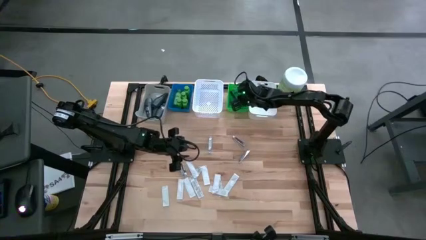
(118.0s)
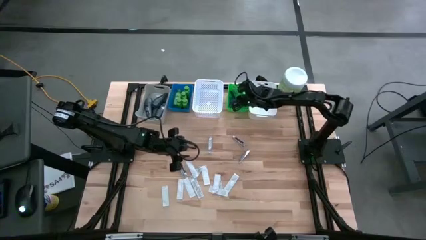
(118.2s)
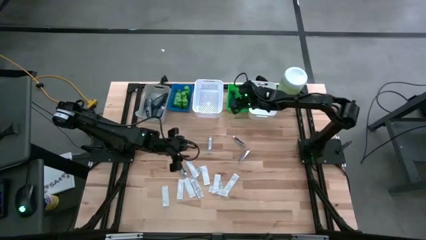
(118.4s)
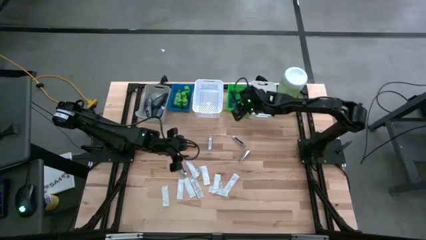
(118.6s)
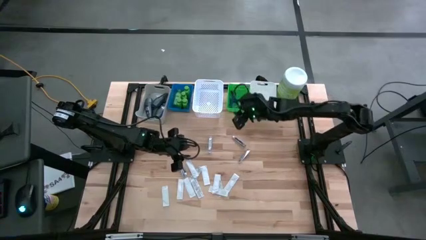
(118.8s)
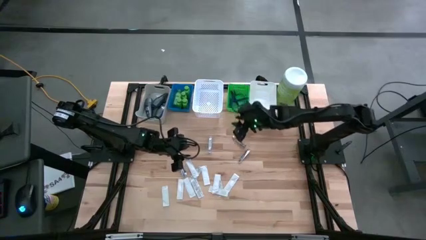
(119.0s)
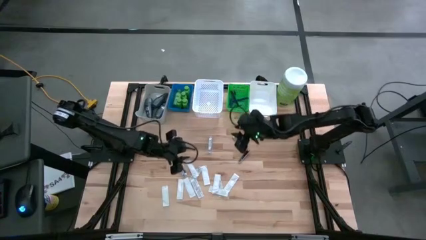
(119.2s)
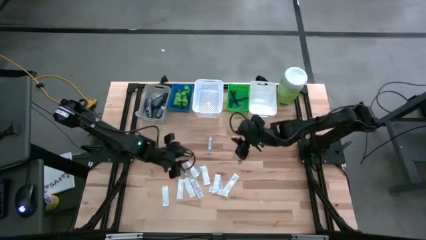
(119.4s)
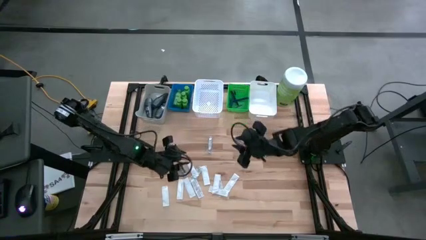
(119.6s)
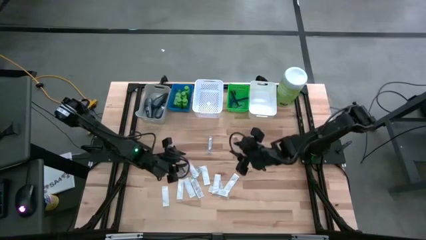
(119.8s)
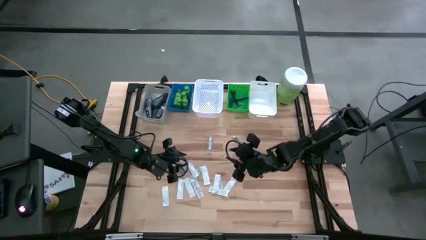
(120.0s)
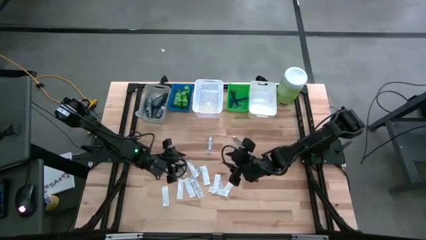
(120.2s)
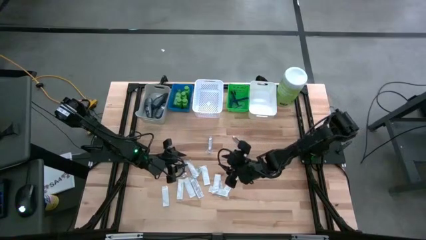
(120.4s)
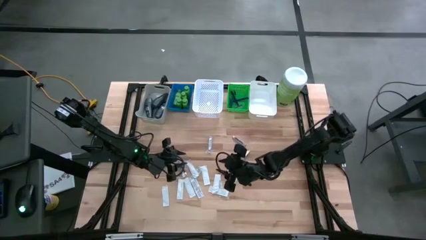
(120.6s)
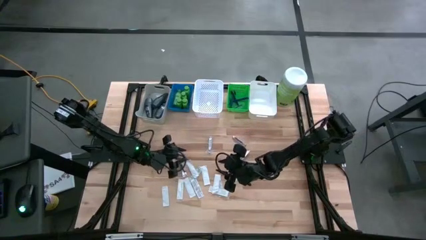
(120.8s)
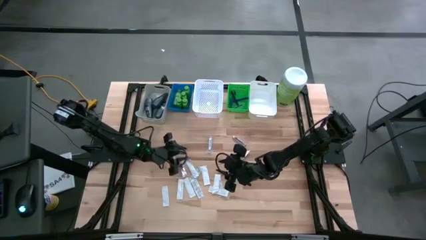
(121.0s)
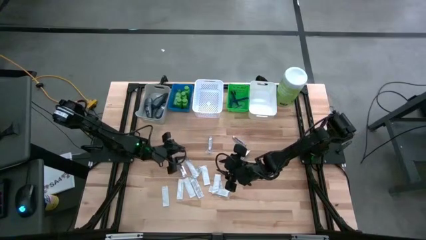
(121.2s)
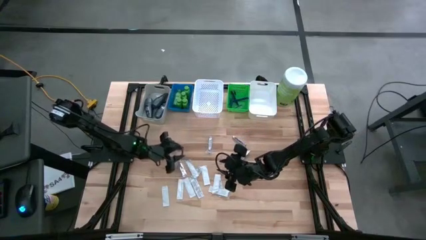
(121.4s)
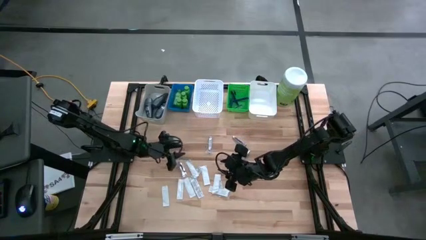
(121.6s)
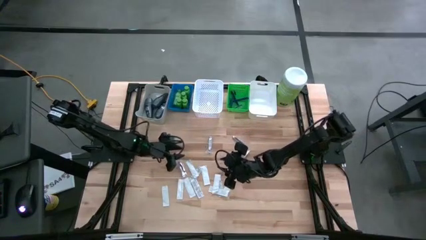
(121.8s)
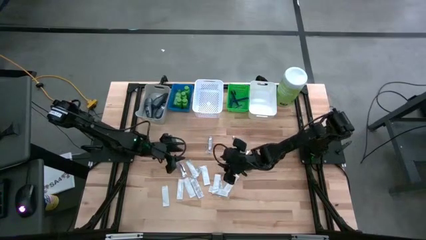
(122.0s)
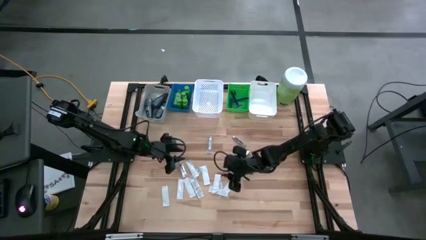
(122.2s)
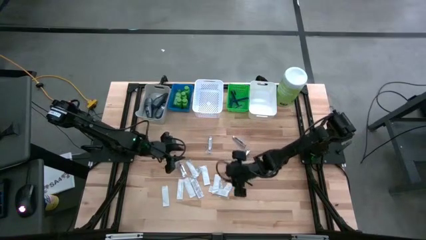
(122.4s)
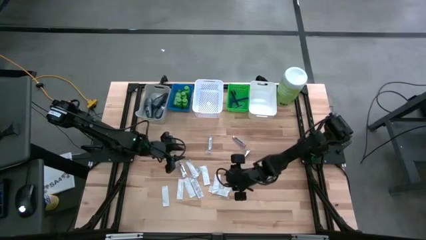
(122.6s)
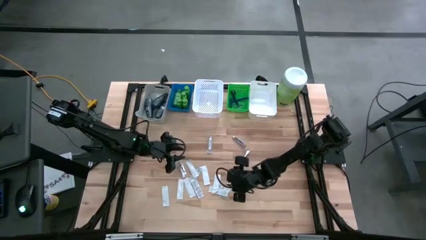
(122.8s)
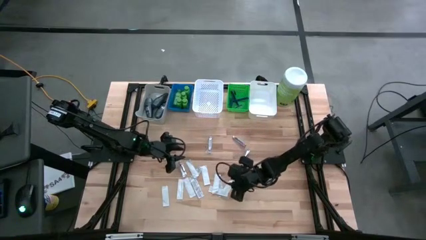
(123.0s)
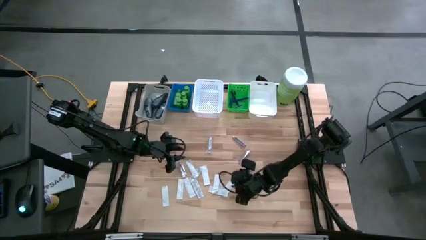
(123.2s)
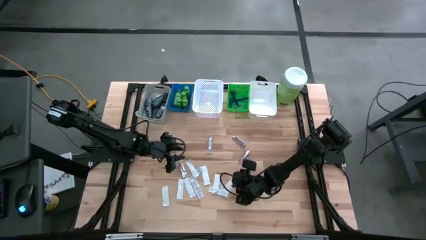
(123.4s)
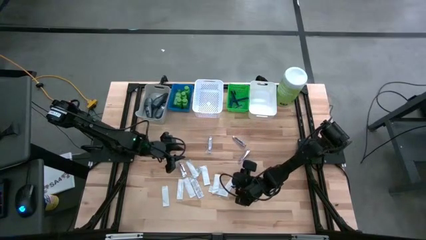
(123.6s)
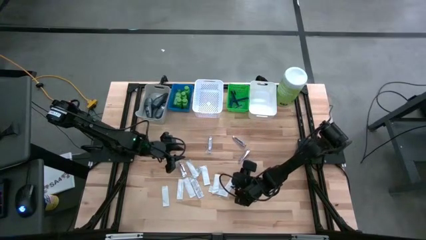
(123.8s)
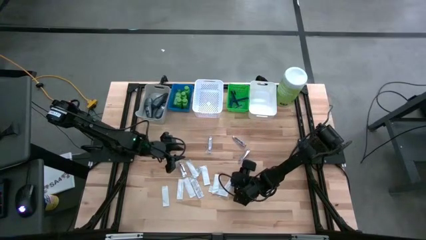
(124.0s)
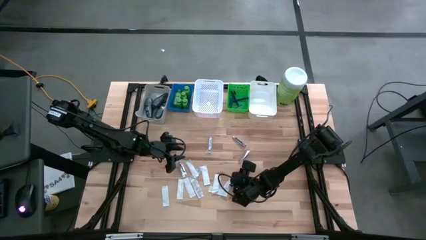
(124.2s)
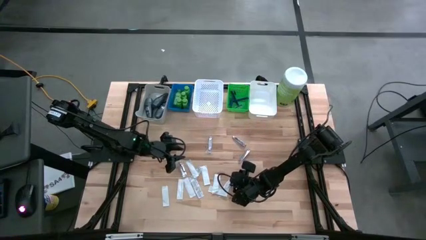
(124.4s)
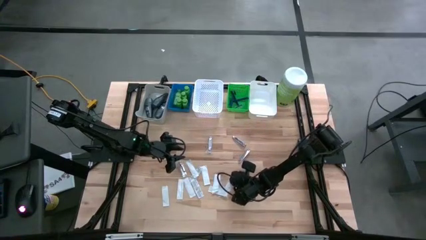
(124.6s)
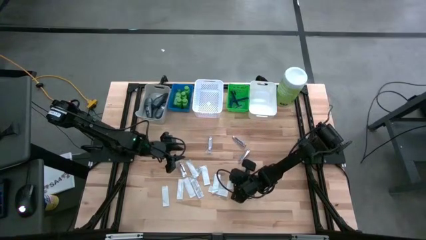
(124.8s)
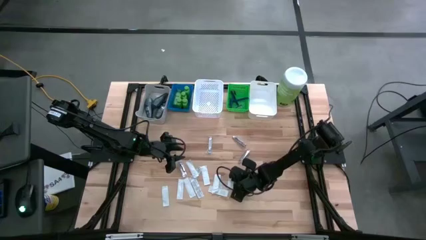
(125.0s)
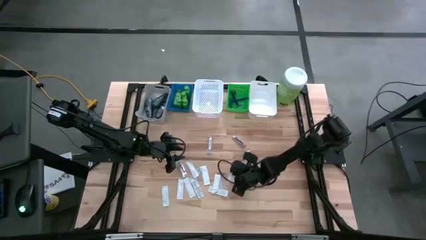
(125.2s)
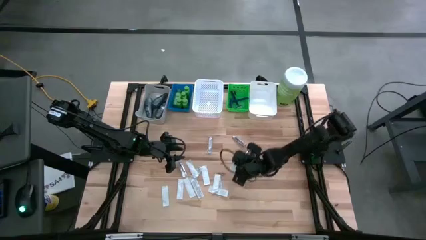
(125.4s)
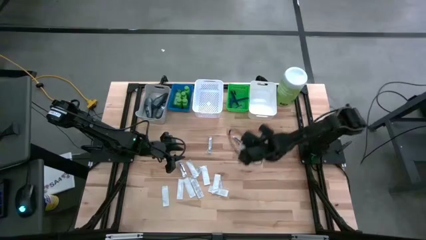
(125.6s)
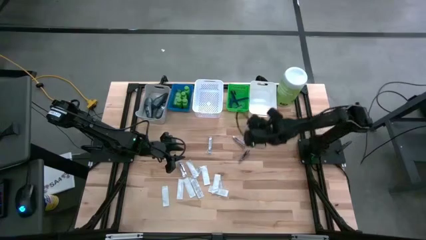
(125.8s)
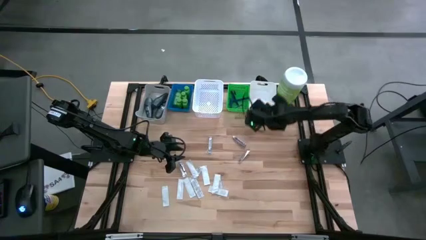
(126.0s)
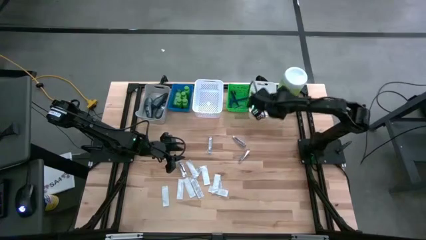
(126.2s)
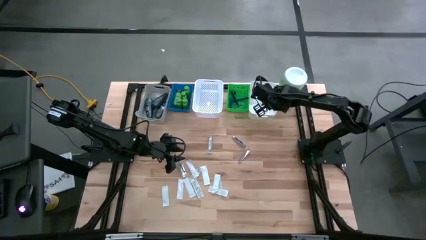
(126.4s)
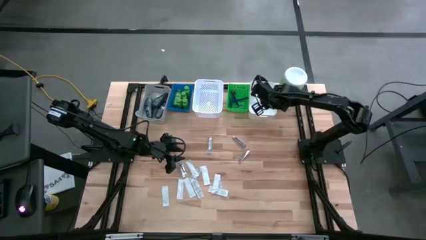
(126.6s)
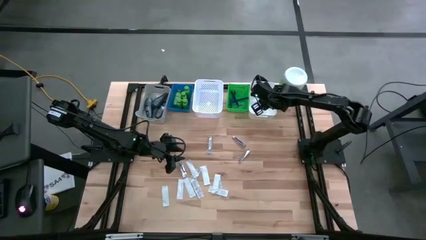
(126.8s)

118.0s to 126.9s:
Task: Pick & Place Travel size toiletries
Put the bandage into the right white bin

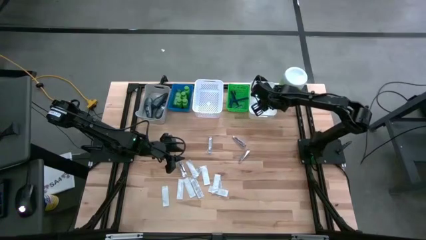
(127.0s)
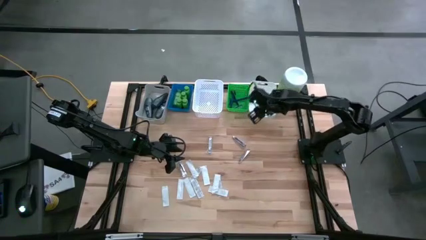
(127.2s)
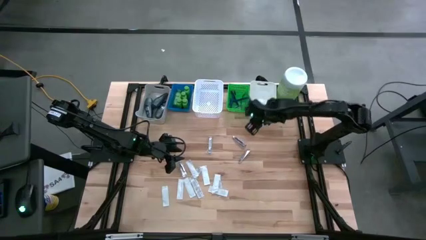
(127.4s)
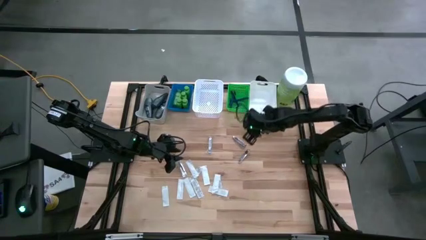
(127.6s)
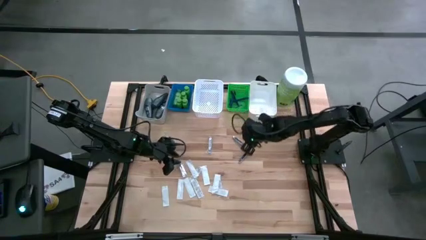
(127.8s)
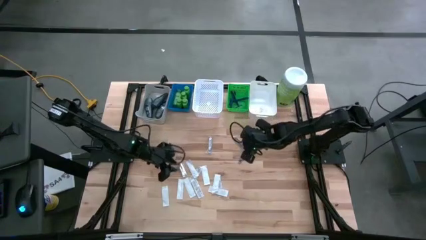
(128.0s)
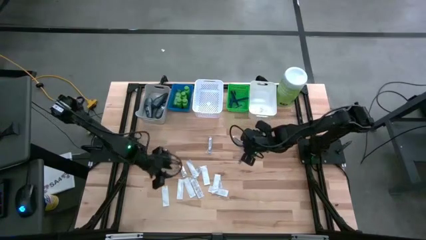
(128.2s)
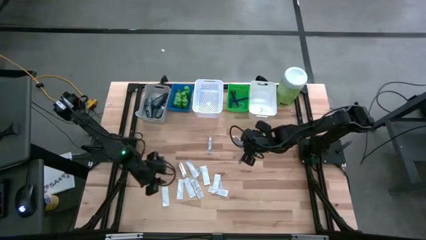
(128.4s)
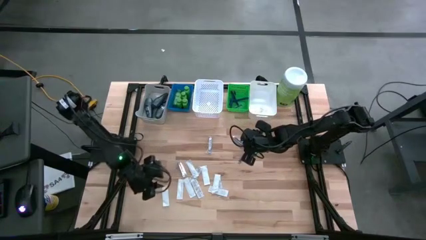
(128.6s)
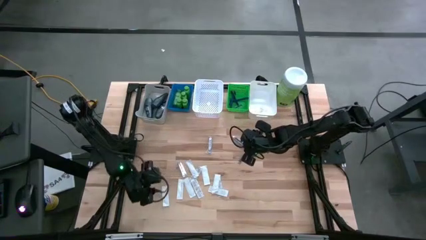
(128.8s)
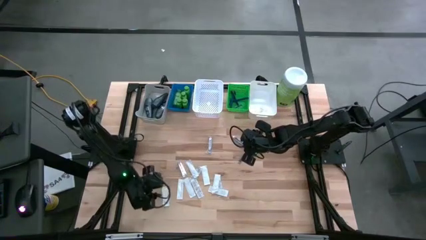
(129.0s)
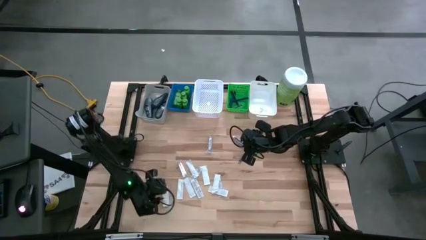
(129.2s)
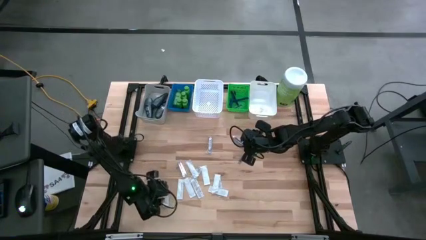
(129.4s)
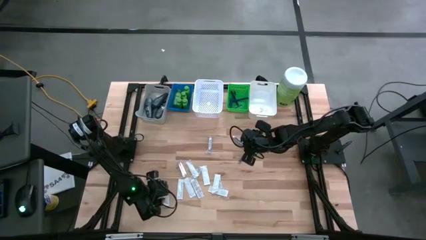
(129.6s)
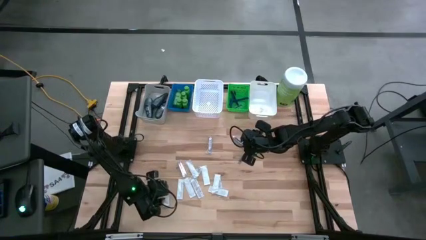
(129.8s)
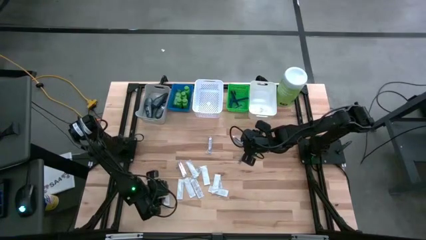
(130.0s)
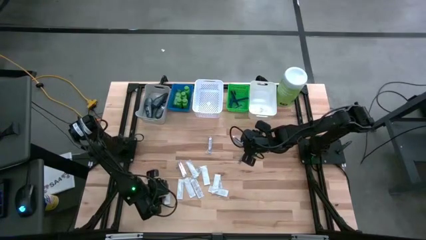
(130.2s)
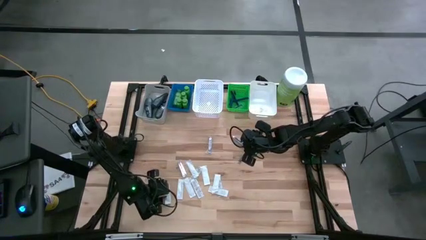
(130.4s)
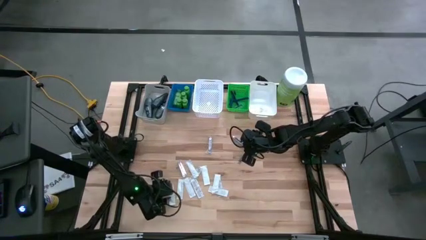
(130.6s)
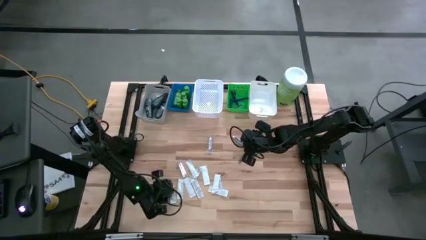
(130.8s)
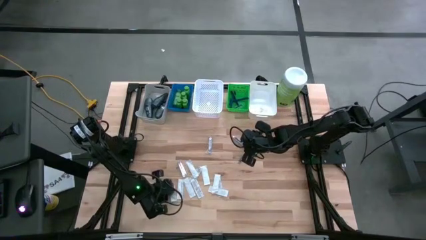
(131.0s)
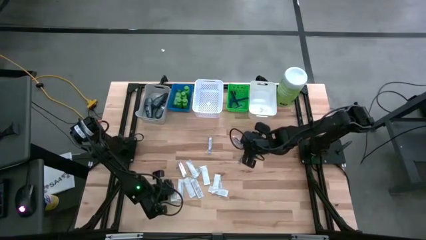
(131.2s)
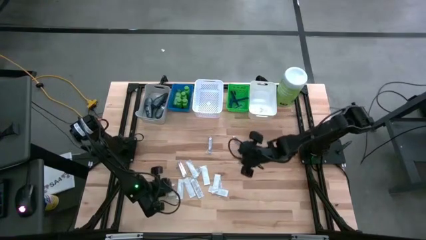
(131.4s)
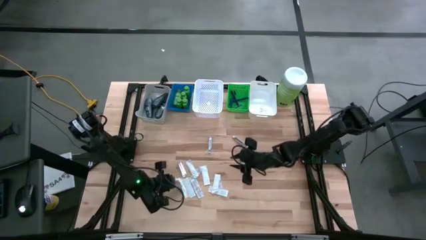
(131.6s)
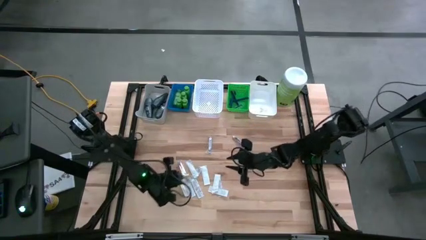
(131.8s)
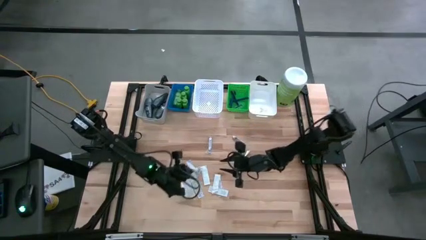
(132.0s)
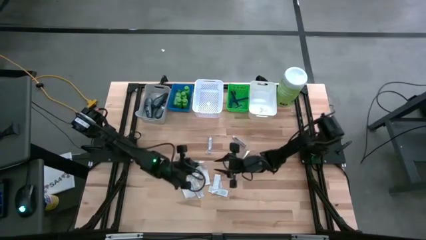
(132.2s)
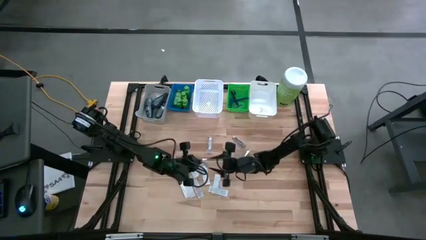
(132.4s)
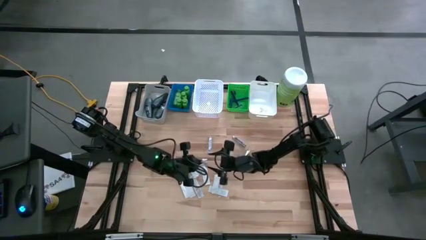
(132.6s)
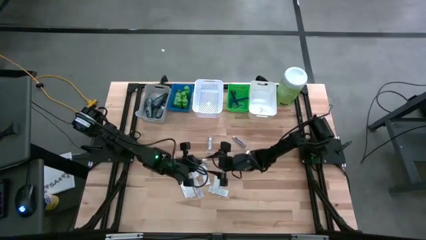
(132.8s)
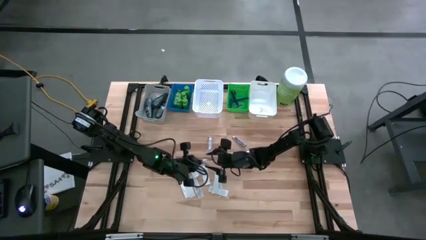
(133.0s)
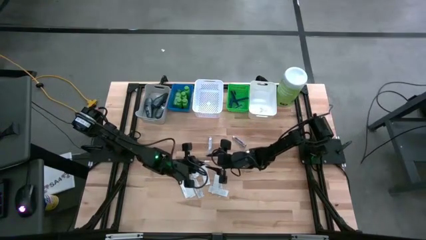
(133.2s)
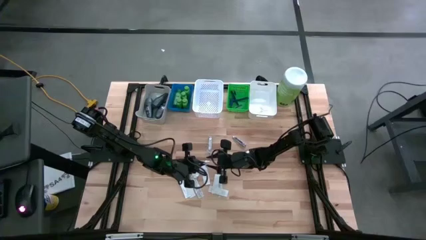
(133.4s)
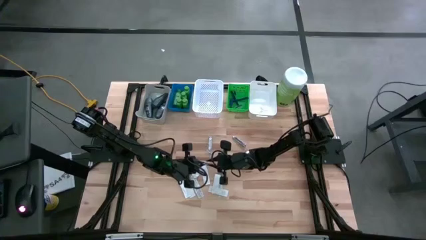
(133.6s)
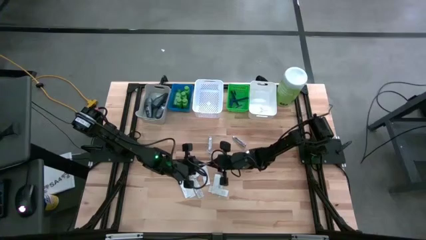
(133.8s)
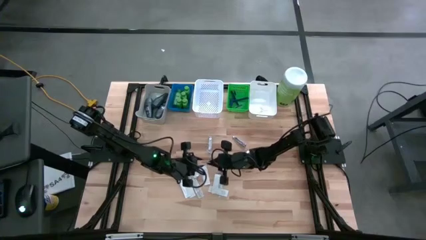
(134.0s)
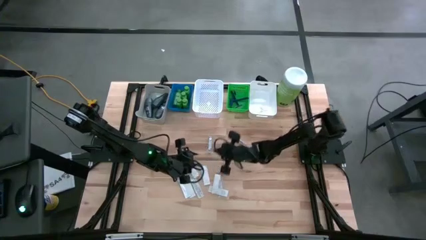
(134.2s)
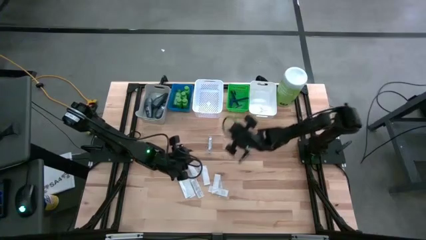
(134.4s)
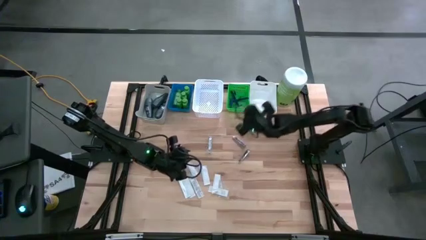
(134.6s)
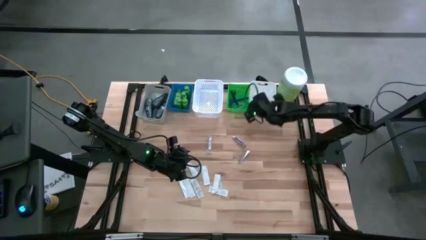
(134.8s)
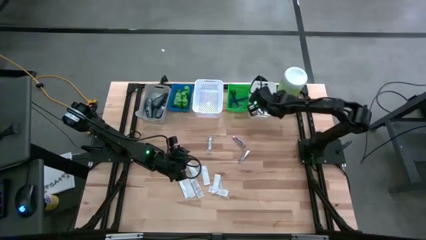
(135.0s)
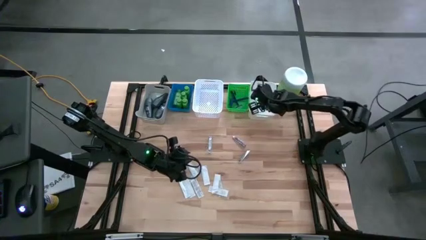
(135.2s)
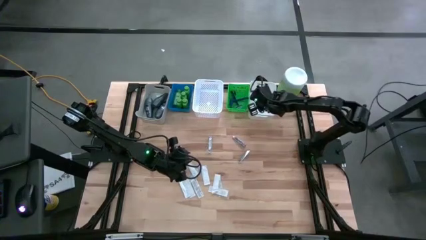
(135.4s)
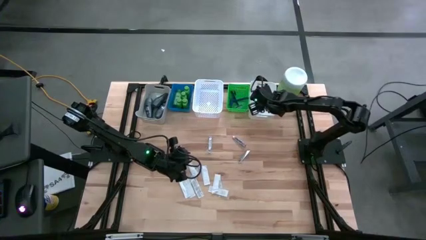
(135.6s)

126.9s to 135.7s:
Put the bandage into the right white bin
